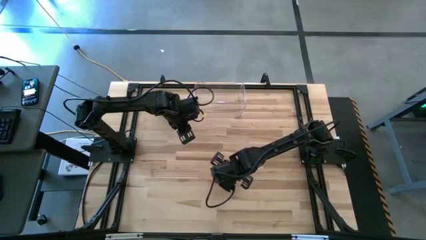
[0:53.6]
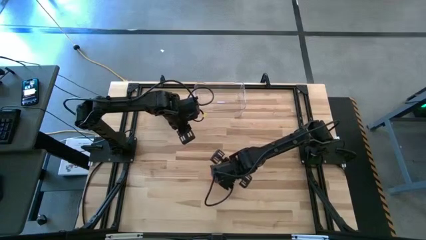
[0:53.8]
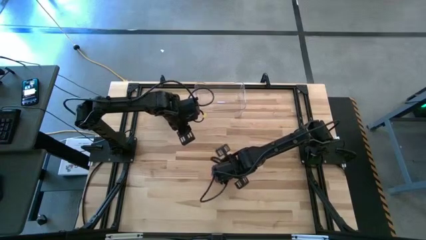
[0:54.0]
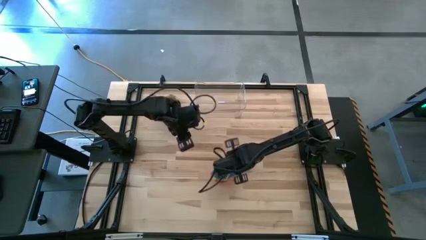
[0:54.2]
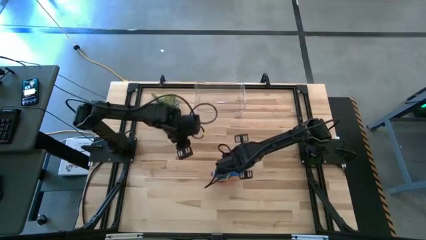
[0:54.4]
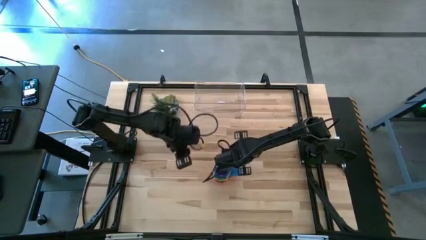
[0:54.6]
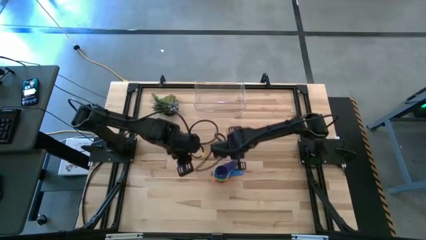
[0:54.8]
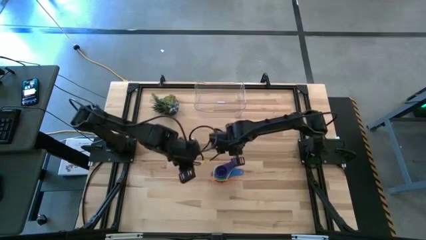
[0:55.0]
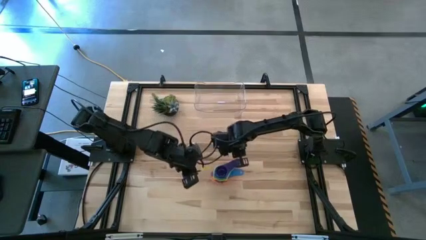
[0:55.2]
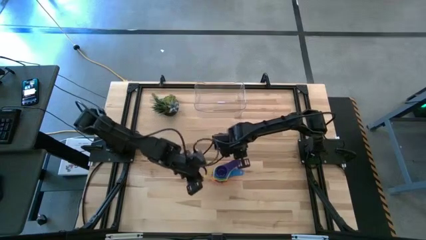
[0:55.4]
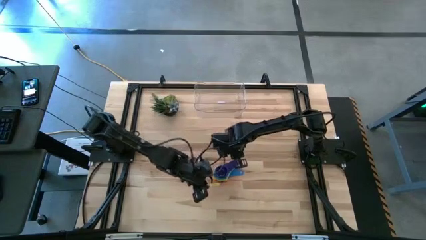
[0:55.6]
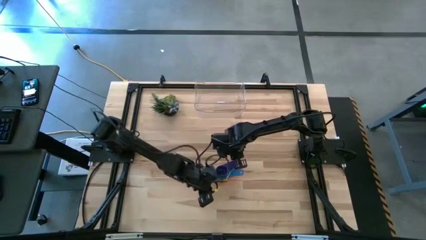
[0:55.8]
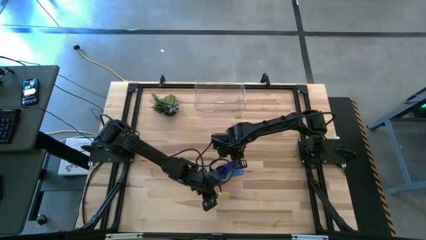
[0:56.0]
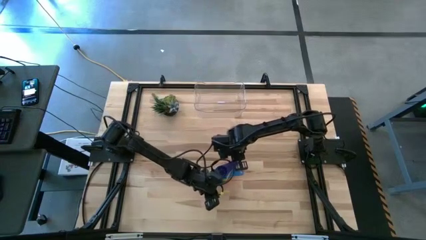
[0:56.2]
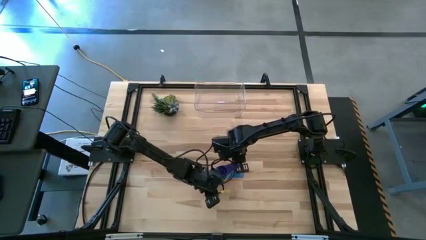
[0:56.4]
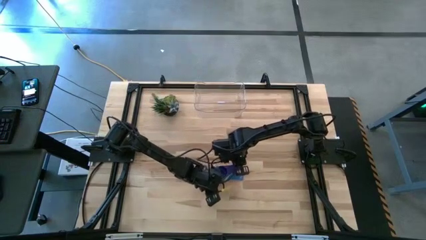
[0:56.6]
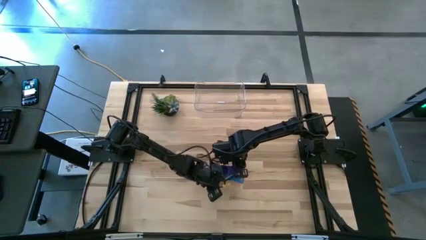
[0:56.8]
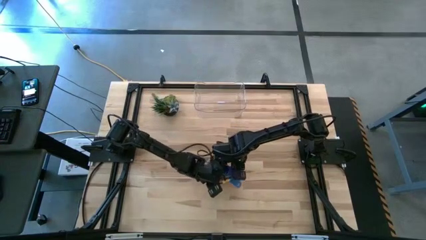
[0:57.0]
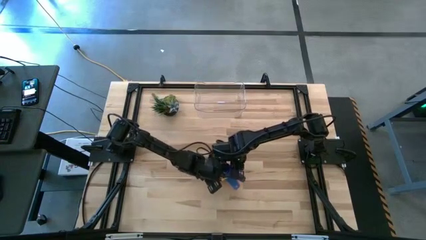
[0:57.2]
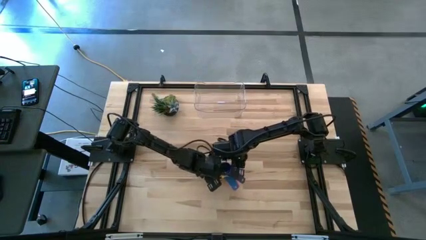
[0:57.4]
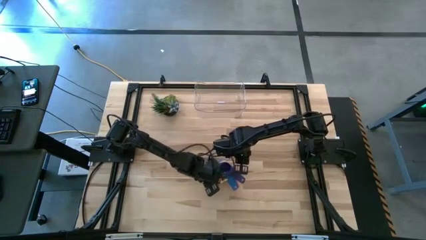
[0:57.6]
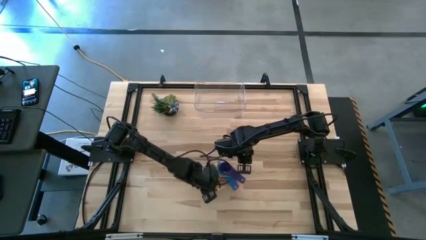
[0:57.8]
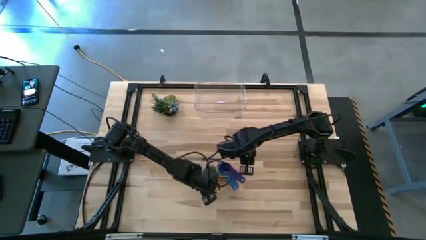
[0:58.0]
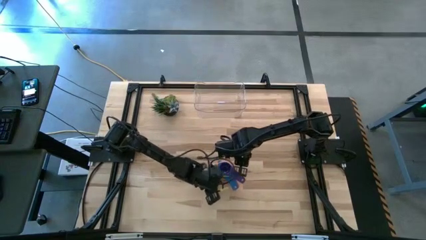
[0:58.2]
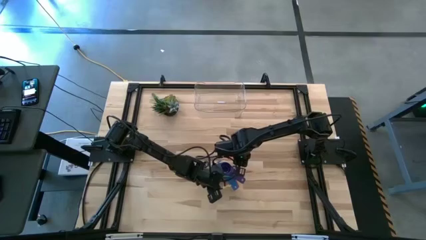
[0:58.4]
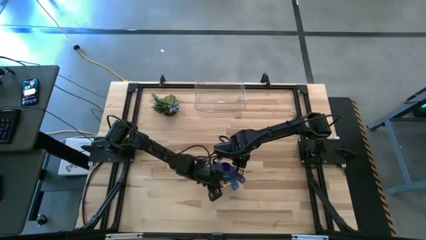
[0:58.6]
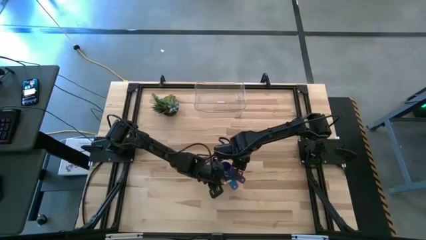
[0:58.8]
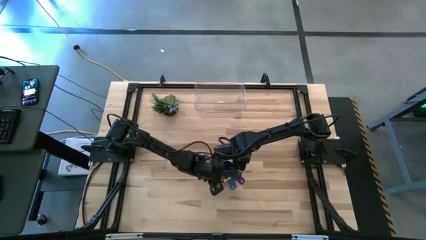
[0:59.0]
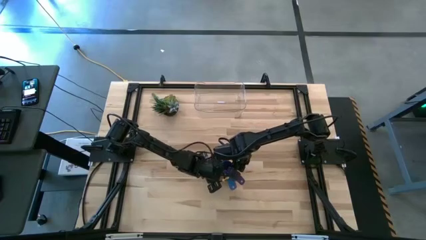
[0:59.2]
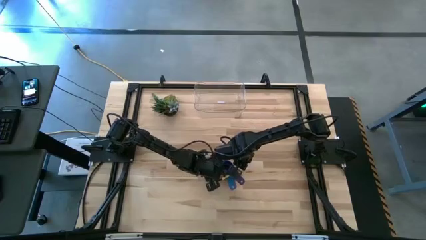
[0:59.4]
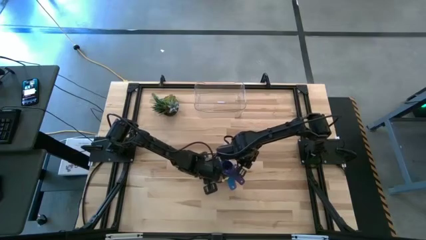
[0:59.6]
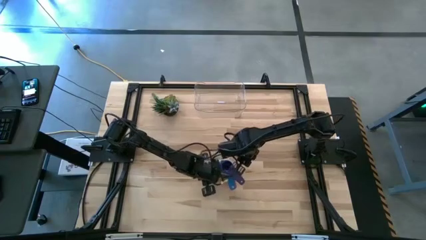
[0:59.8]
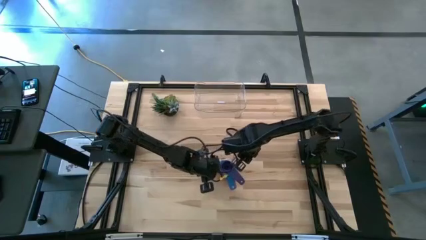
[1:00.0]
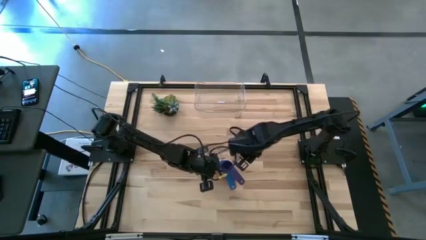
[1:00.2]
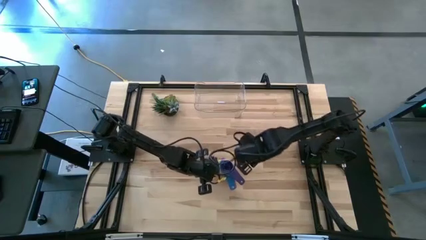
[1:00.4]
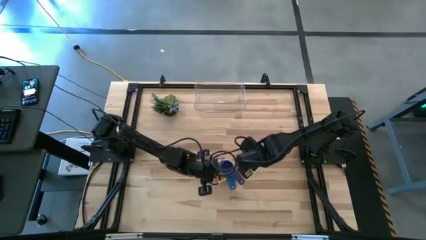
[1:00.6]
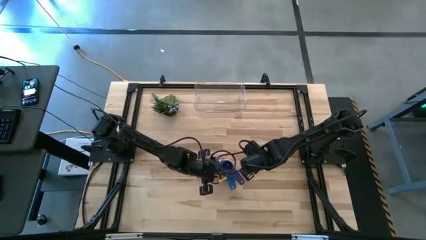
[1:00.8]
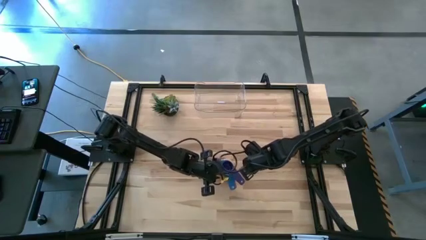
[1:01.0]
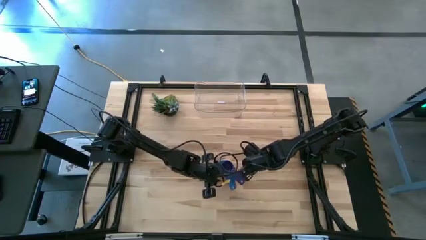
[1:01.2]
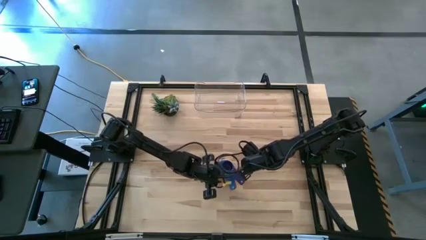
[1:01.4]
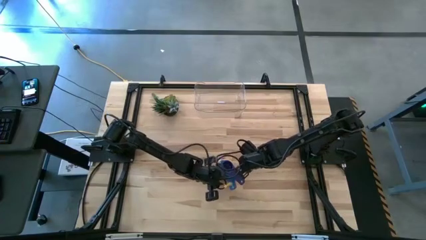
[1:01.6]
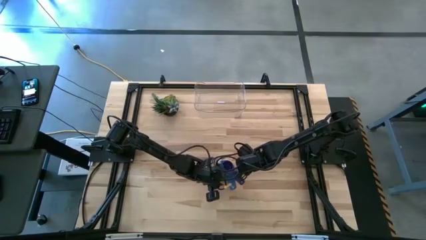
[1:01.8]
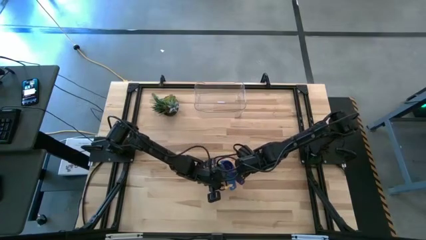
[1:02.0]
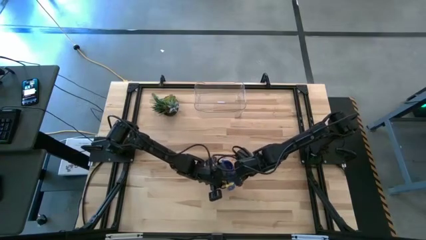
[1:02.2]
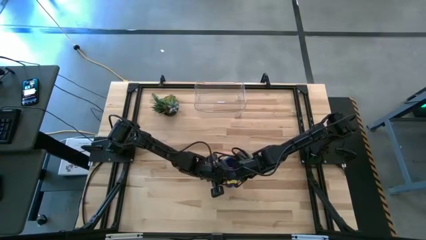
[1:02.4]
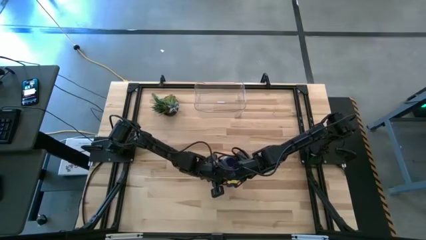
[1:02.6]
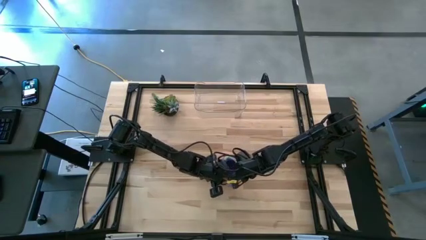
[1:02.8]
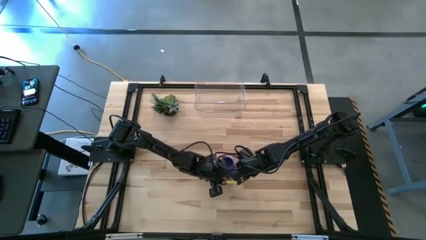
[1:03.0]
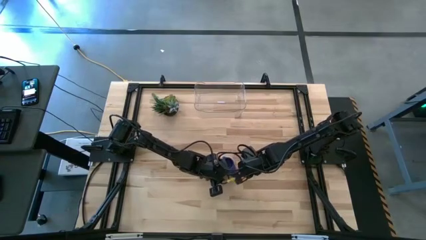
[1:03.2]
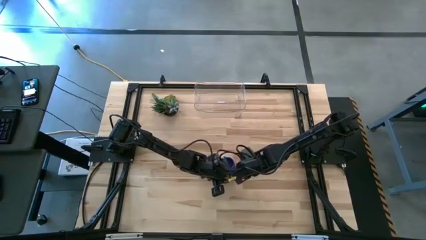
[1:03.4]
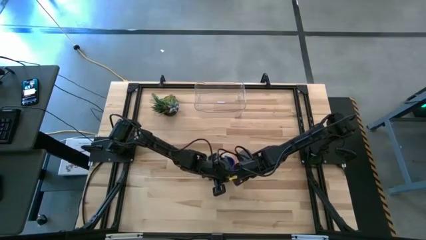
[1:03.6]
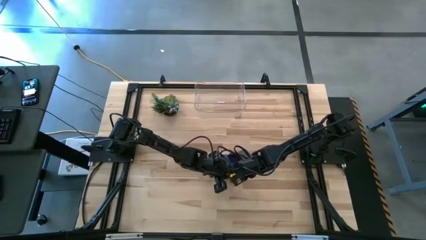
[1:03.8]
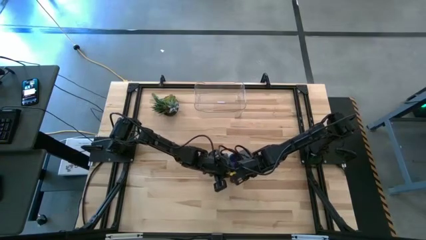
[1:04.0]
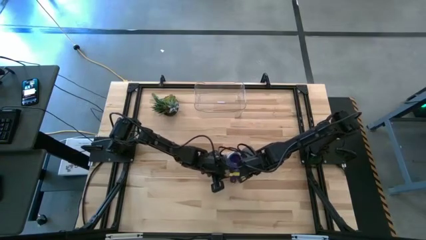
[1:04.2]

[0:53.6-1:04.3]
Task: Nest measuring cups in basket
Adjust the stacked measuring cups

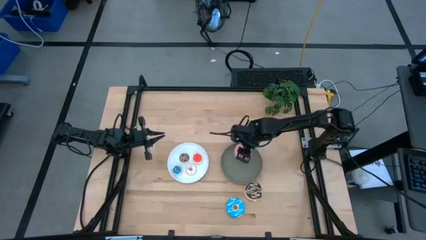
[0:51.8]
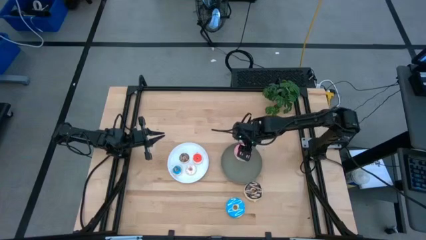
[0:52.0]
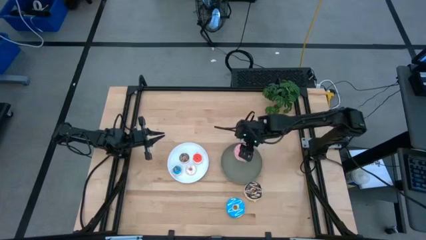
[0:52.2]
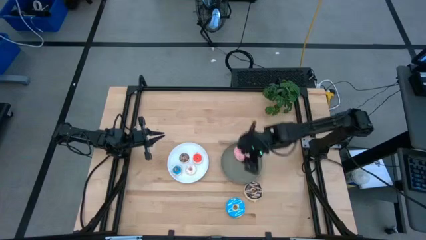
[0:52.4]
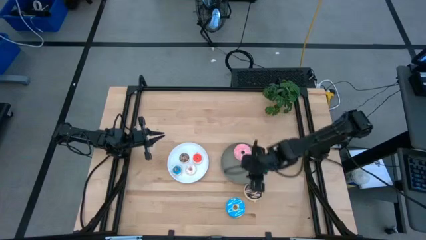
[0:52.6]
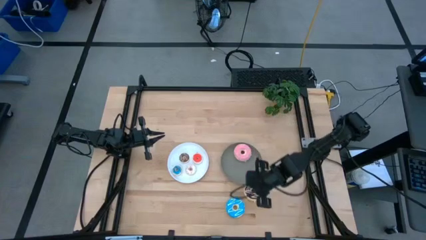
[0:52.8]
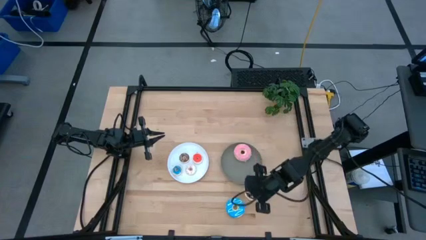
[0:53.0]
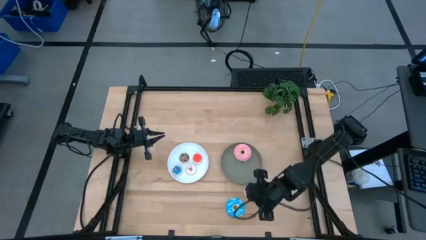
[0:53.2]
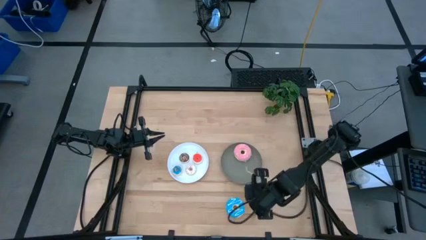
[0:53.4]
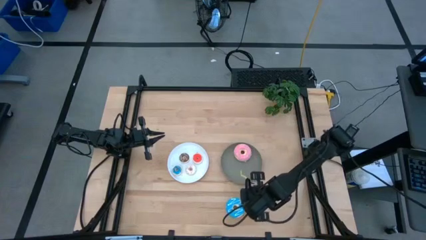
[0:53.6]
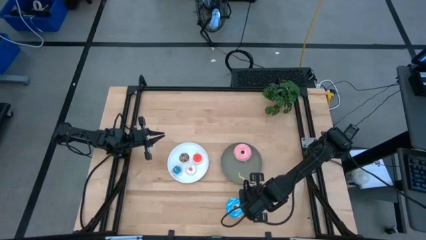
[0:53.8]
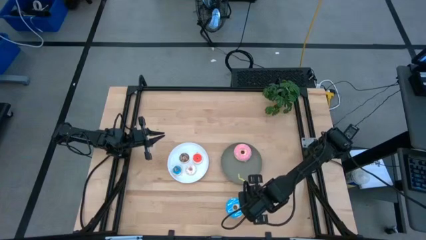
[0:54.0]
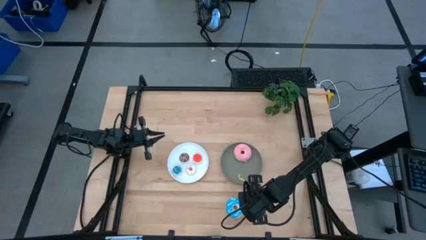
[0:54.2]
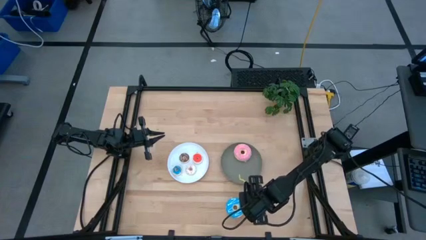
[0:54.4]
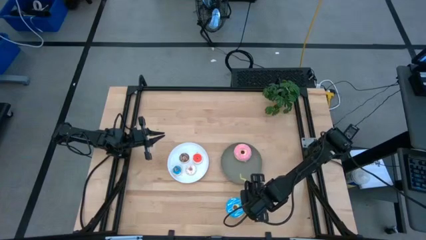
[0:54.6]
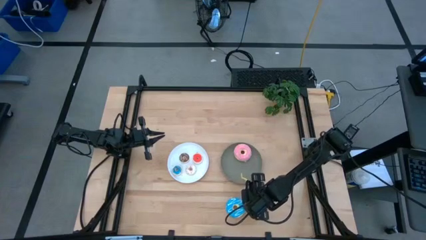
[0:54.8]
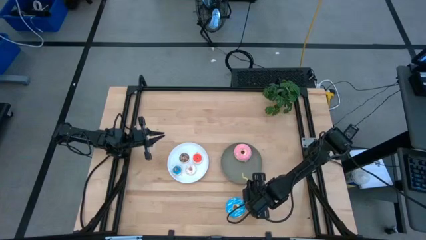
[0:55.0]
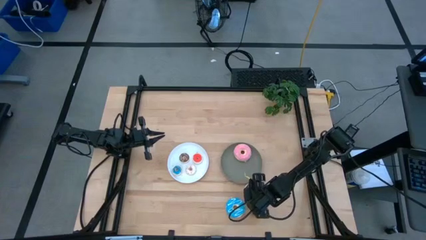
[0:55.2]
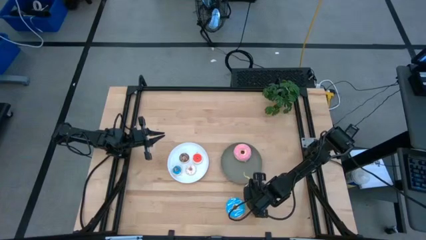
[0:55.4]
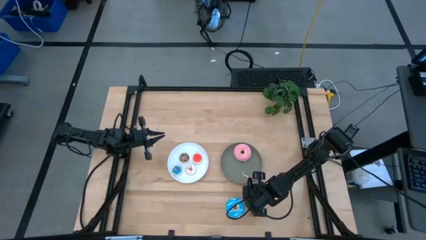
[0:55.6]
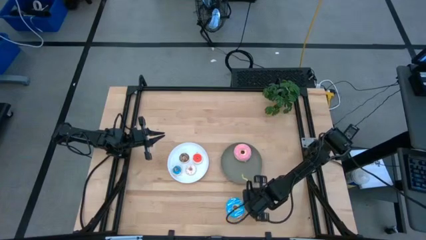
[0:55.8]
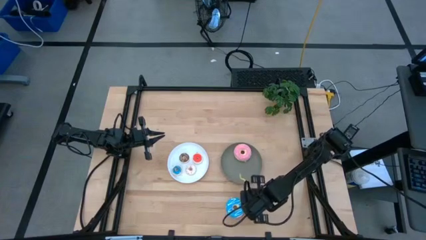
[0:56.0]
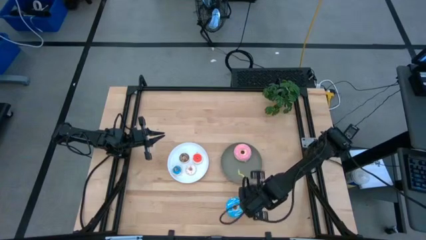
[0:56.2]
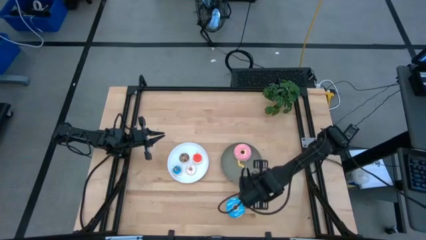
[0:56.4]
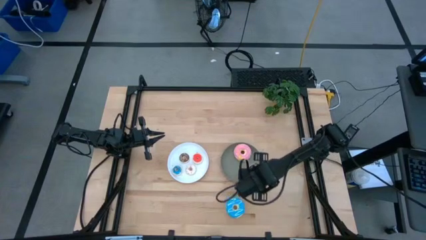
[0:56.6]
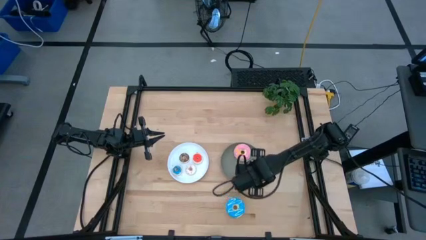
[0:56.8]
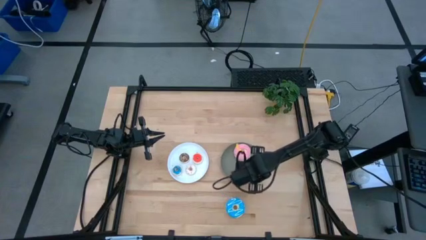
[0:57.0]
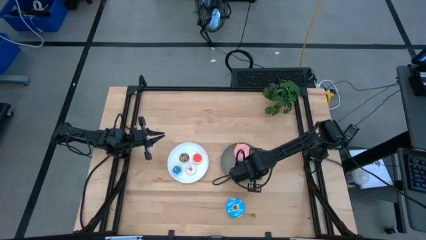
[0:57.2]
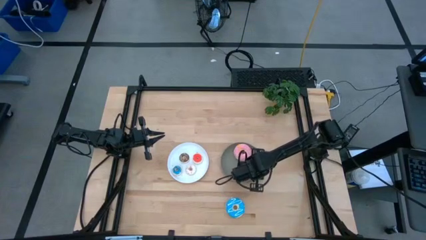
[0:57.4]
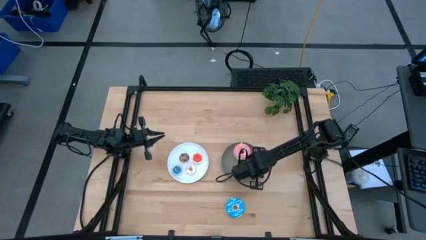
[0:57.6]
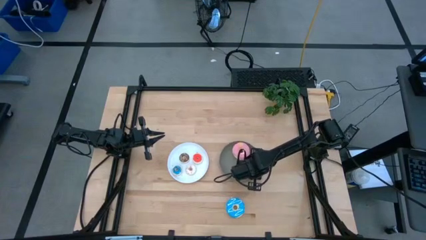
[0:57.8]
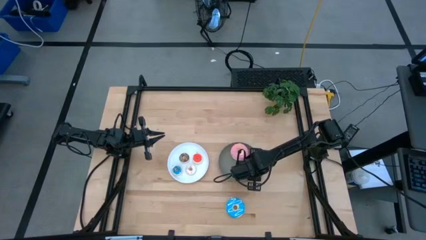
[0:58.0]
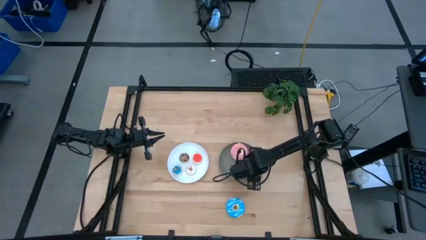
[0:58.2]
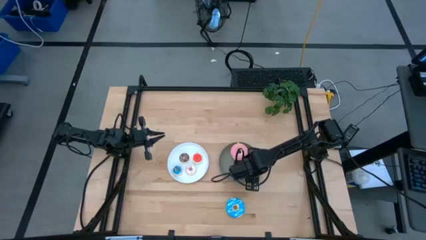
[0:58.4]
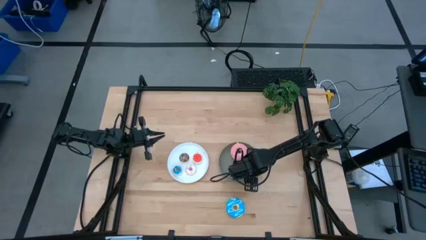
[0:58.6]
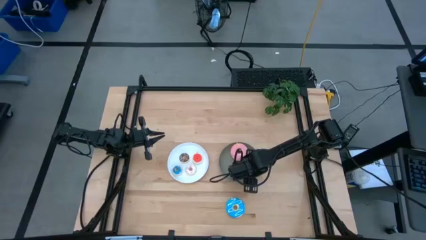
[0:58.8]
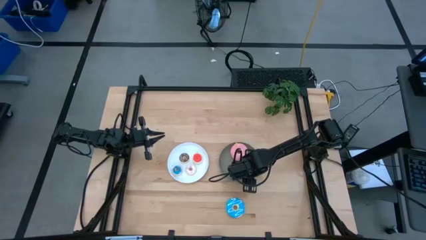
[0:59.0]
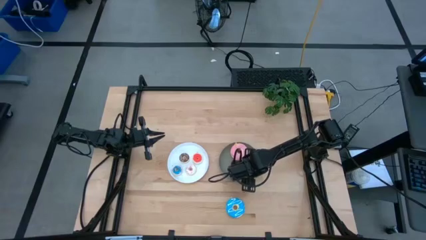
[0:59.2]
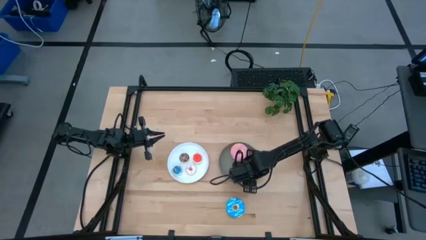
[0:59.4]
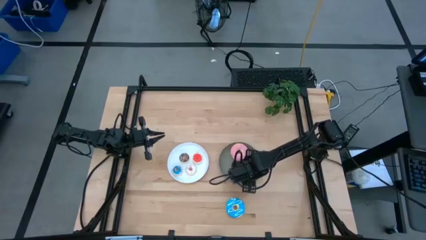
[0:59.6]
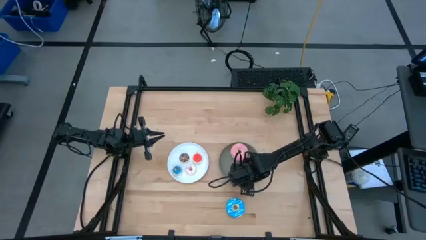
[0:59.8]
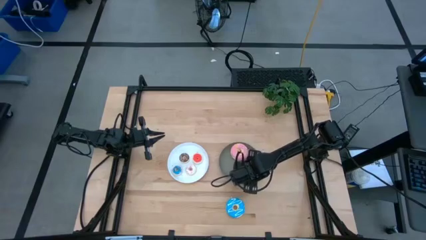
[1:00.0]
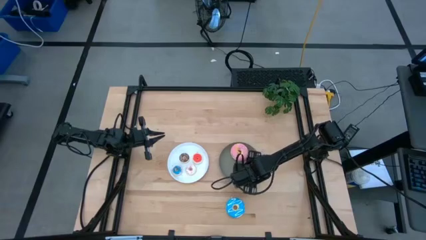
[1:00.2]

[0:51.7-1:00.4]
Task: Pick & Place donuts
Put the big black donut on the gray plate
